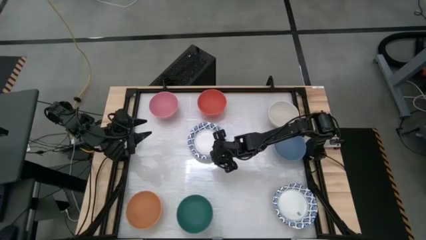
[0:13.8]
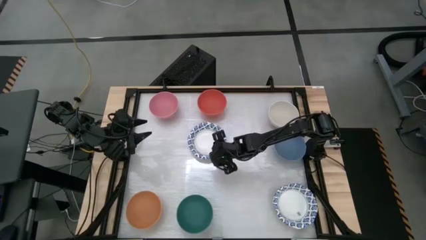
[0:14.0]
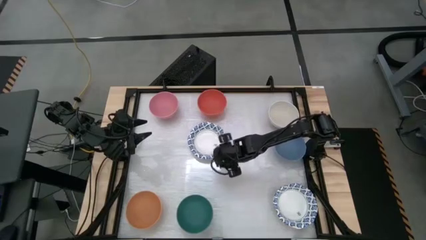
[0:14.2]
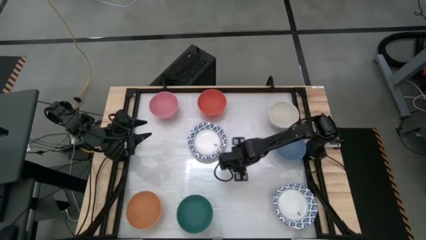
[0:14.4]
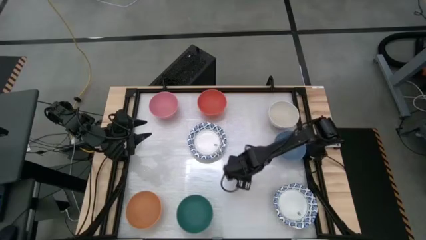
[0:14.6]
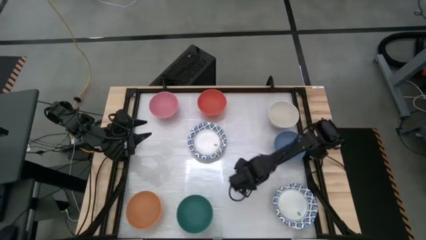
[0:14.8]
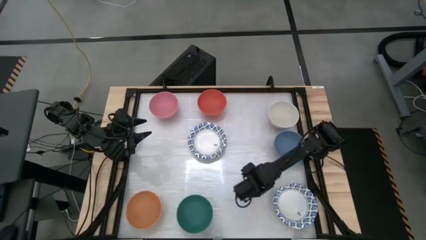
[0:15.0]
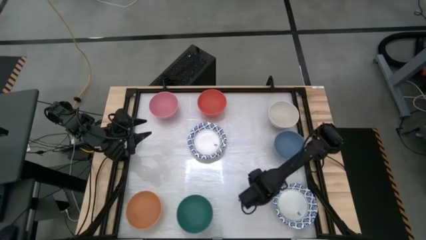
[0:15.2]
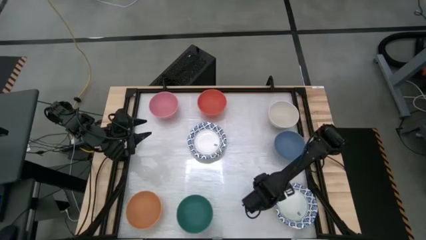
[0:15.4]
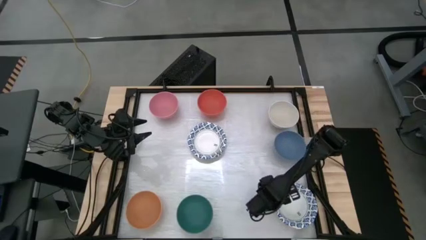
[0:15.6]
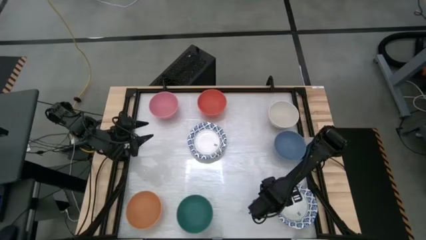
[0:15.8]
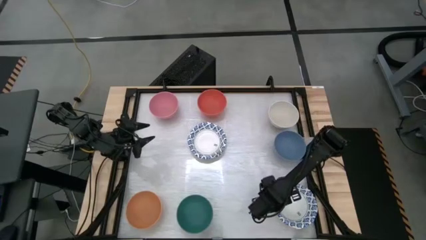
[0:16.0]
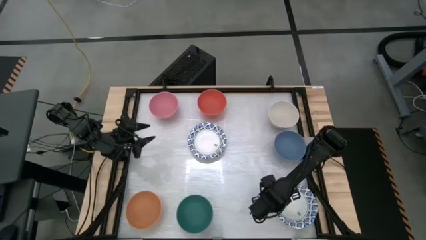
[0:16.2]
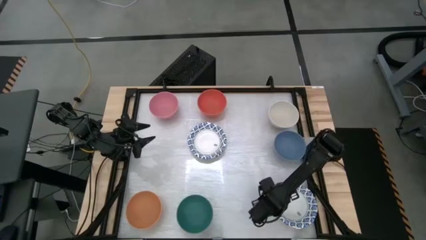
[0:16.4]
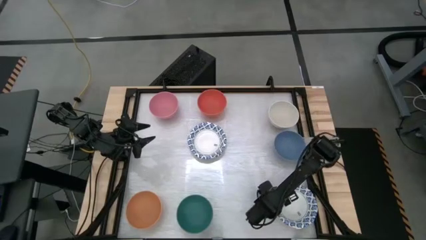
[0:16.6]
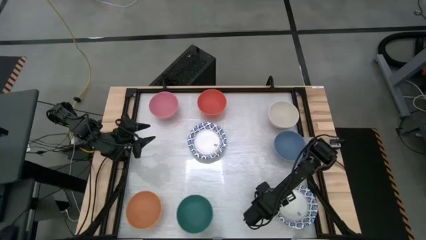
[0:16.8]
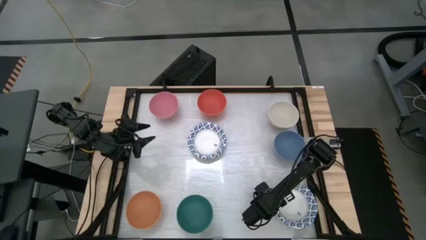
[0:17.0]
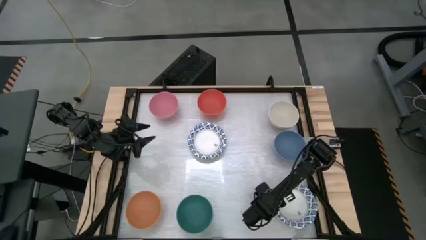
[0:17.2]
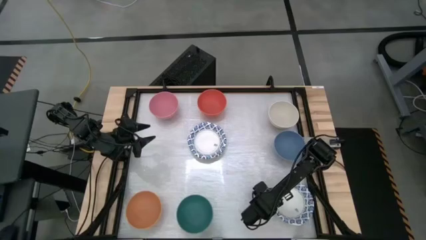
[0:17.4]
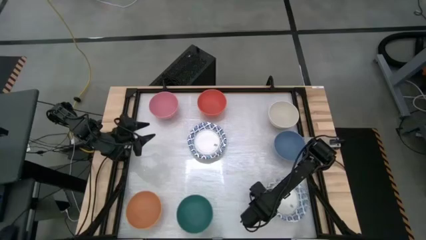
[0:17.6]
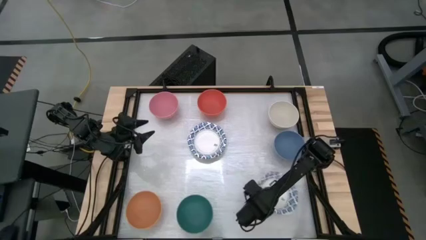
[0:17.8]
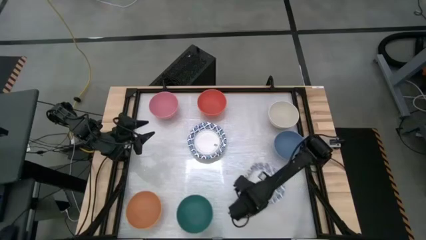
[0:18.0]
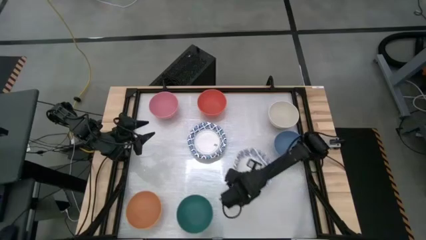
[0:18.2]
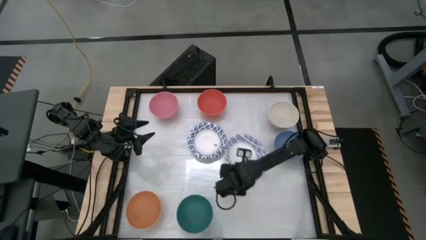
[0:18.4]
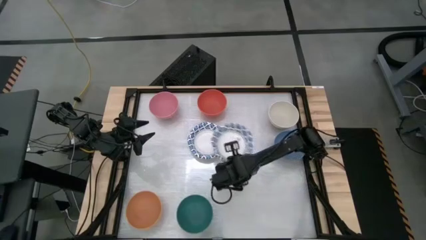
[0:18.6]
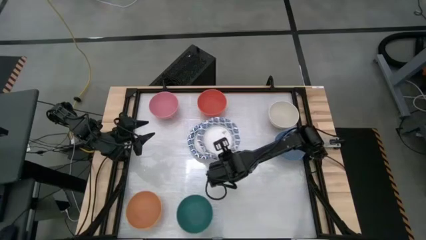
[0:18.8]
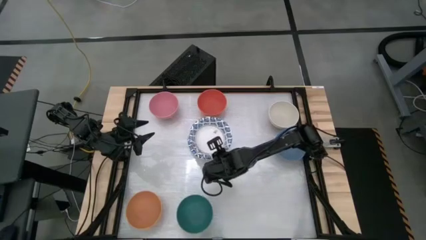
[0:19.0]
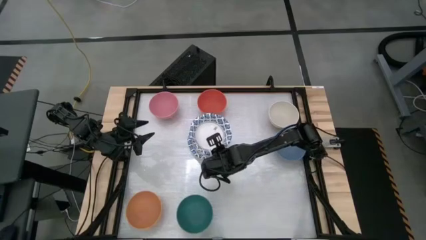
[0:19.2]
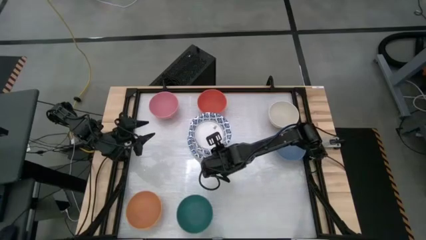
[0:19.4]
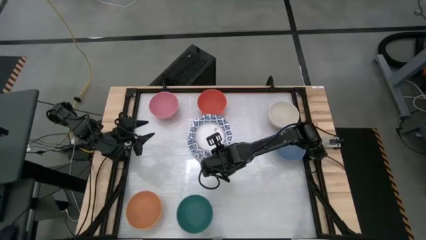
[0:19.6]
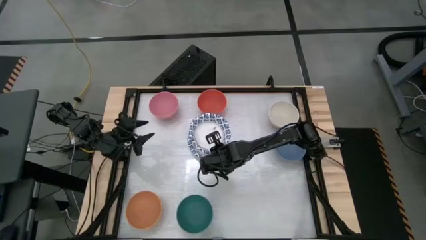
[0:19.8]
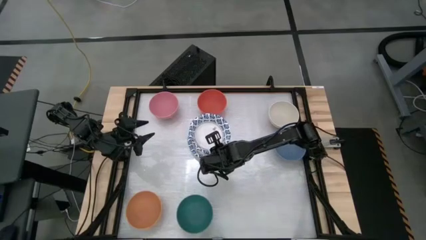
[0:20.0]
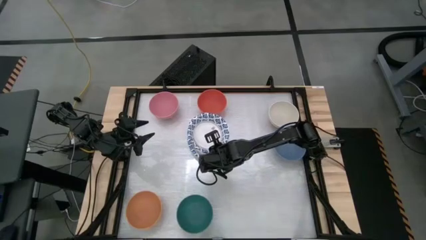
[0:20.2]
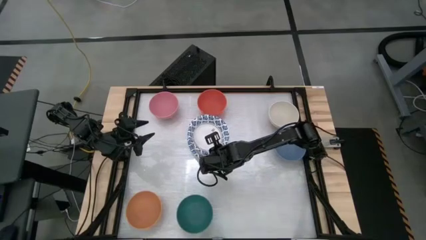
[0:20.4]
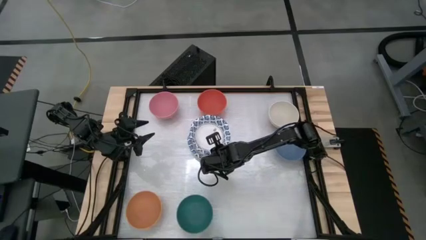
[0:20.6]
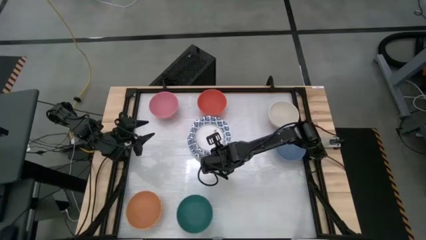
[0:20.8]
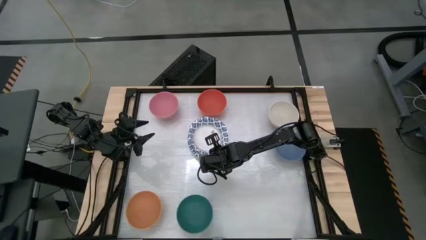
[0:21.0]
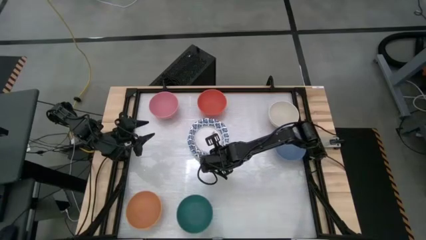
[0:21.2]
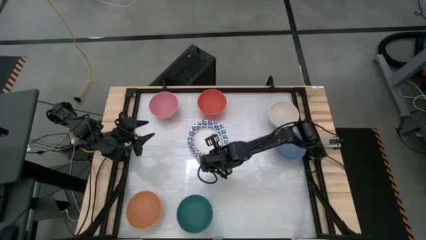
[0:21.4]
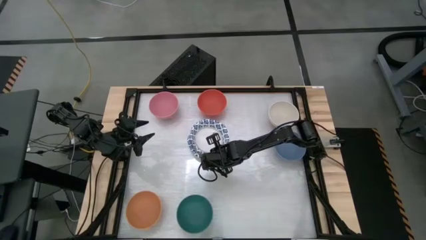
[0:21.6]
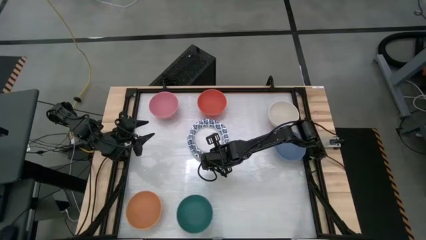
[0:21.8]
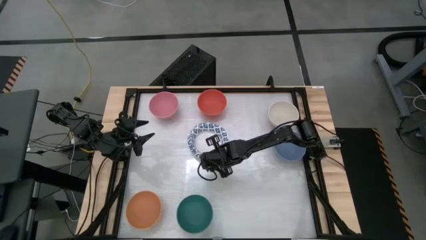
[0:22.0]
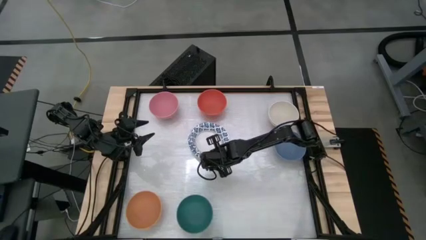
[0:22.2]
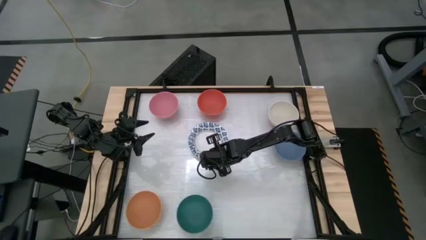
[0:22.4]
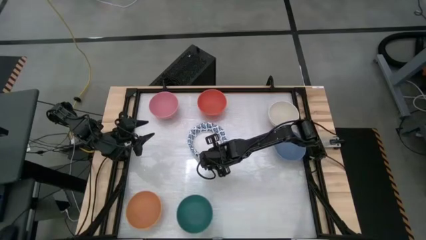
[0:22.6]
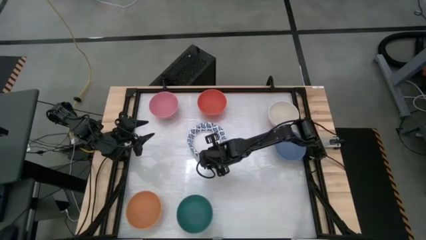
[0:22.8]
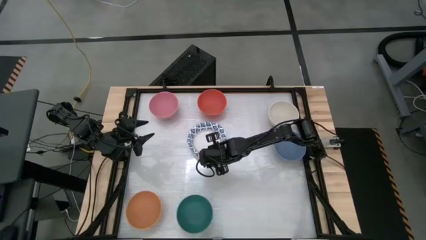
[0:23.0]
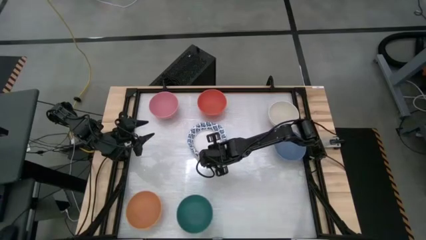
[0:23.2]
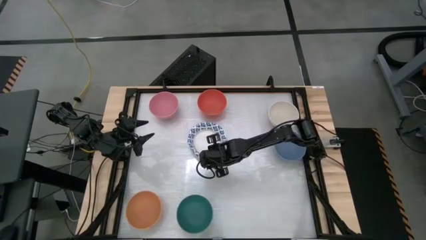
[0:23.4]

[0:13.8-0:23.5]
Stack the bottom blue white patterned bowl on top of the top blue white patterned bowl

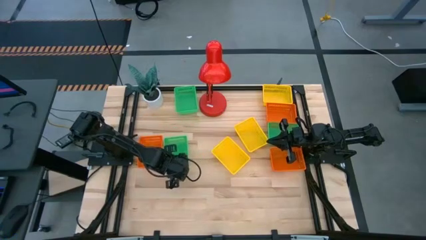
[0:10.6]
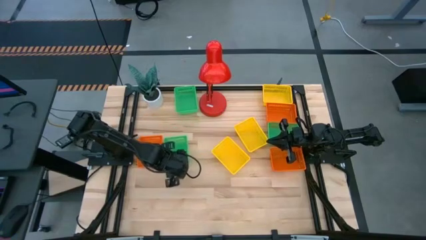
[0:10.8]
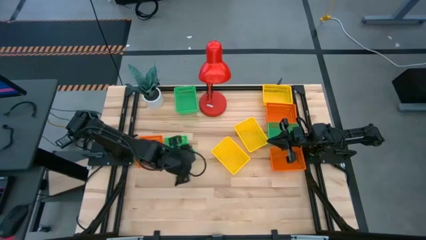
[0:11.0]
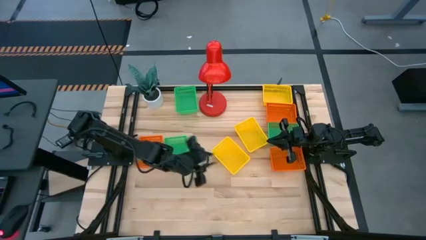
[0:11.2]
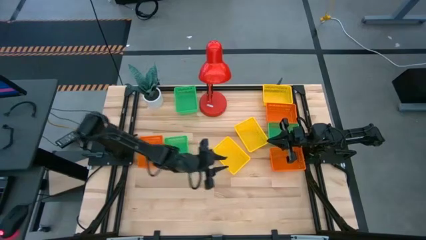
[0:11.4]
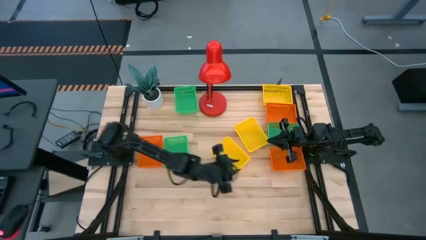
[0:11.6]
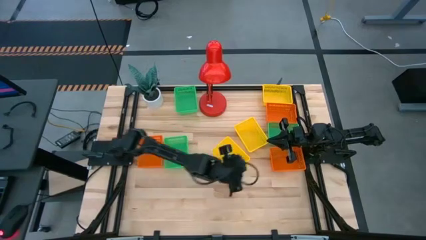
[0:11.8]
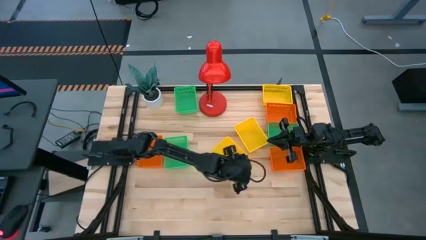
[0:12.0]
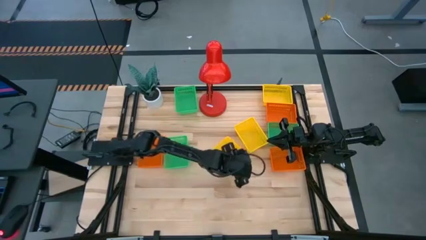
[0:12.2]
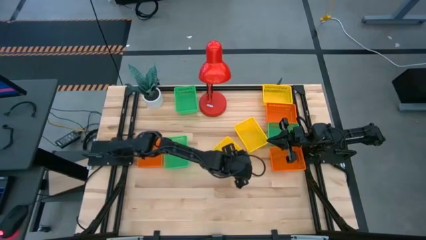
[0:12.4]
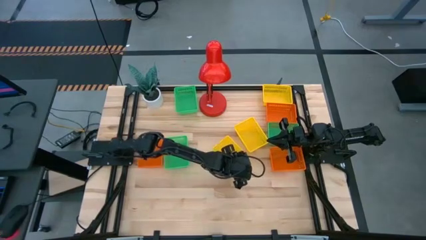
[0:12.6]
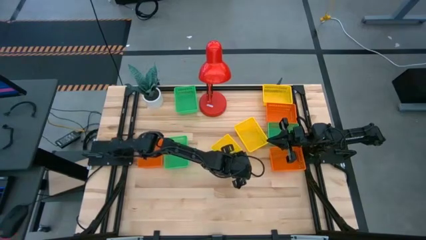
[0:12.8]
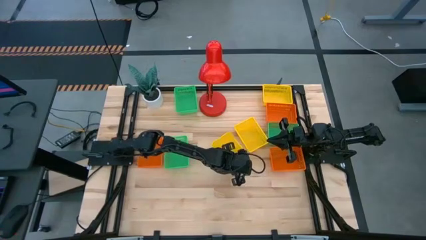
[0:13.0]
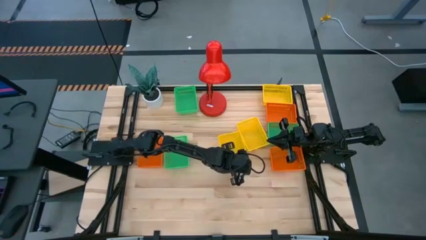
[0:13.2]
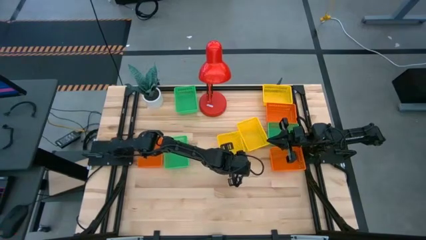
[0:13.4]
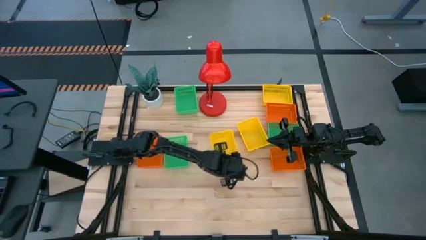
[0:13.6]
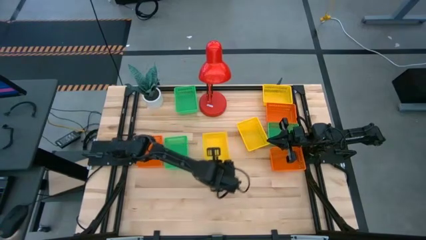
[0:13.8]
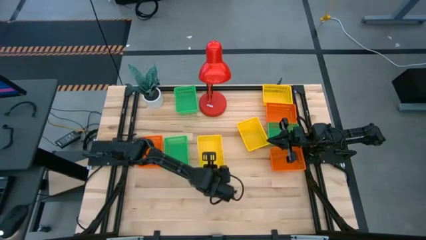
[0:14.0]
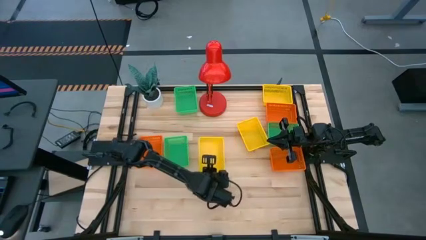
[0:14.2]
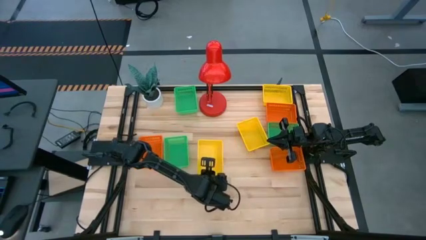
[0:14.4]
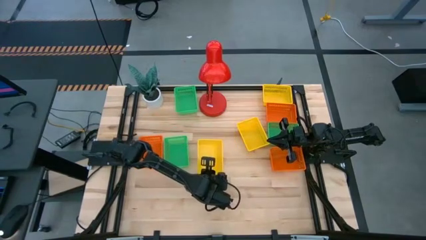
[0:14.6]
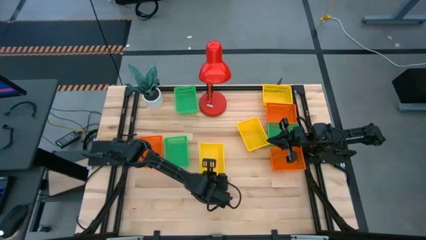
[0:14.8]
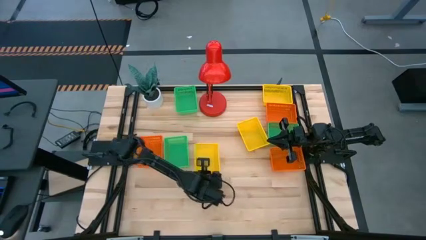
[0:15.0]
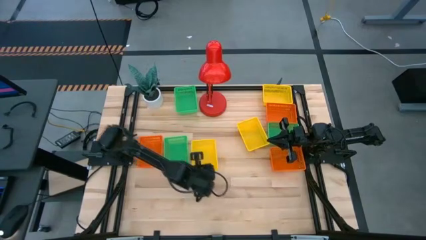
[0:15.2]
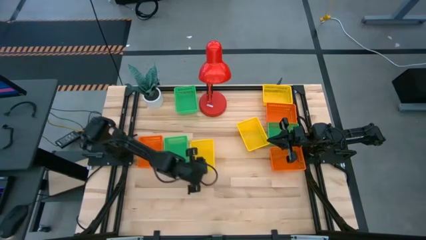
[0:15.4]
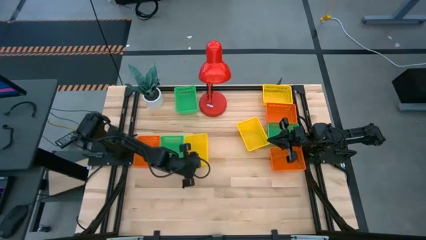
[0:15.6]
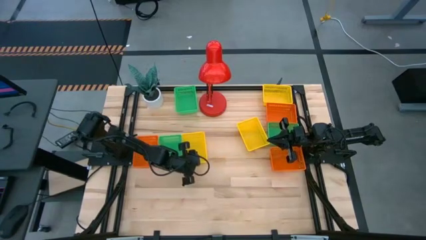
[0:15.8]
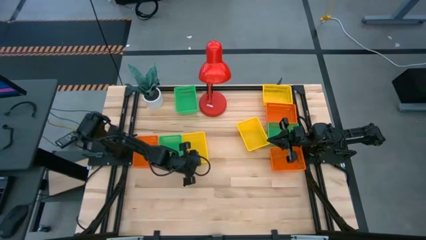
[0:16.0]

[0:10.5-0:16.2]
Move the bottom yellow bin to the right of the green bin
